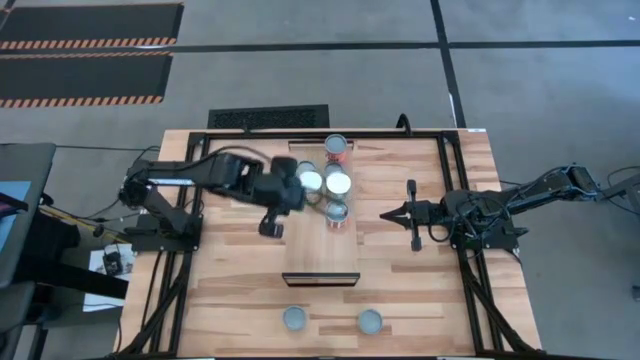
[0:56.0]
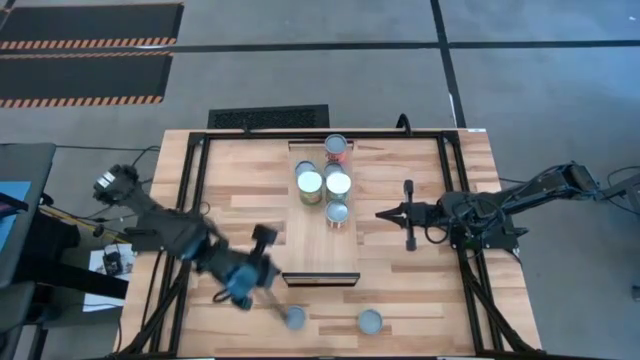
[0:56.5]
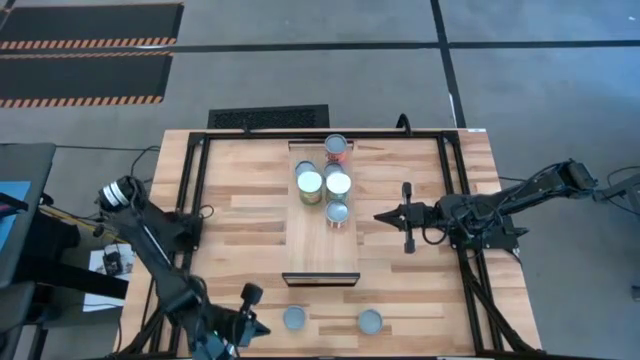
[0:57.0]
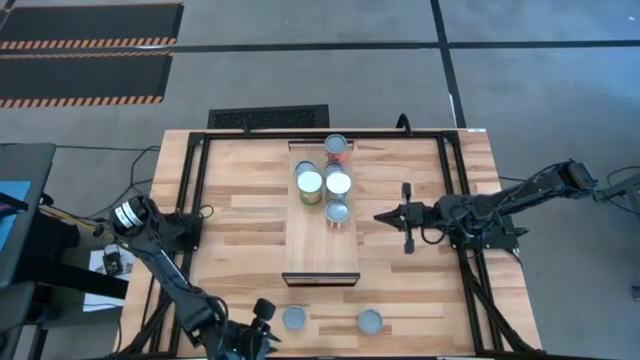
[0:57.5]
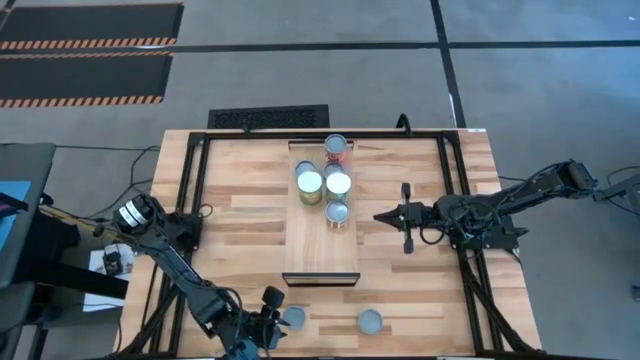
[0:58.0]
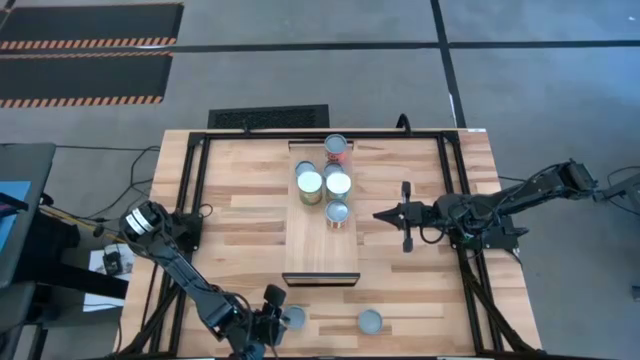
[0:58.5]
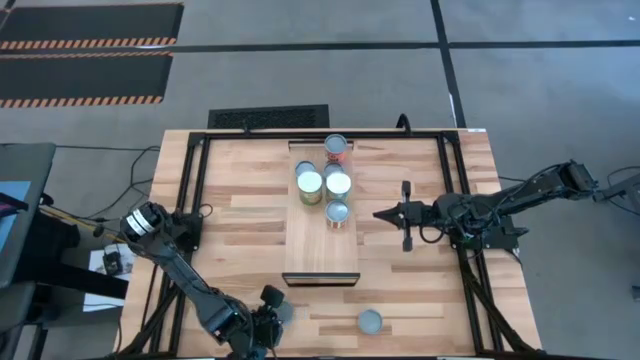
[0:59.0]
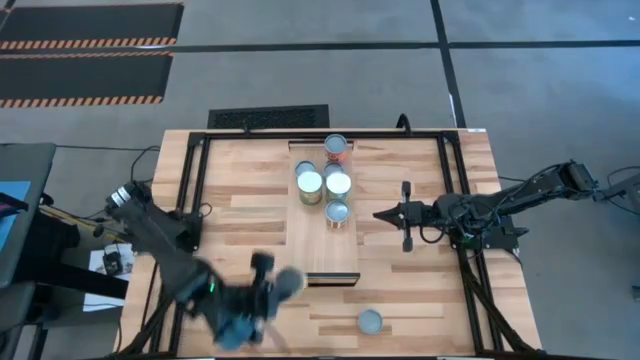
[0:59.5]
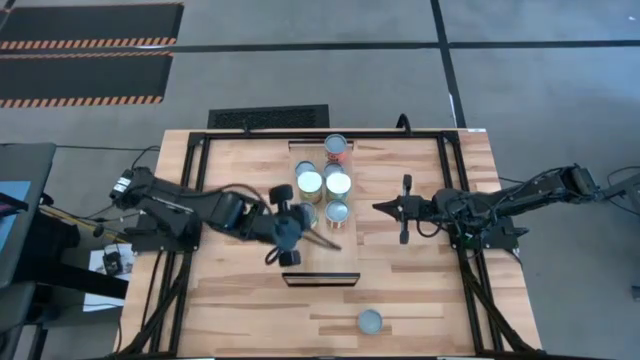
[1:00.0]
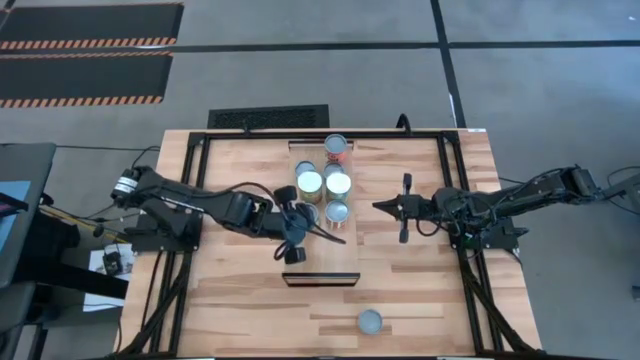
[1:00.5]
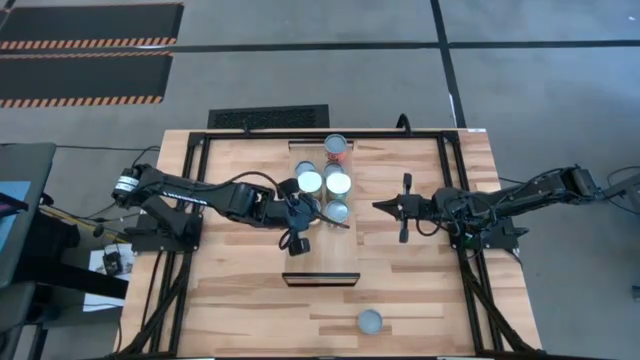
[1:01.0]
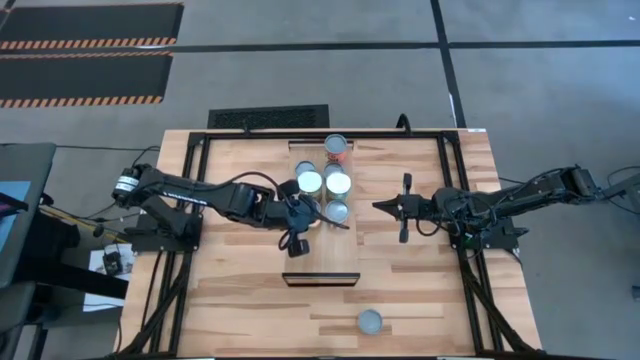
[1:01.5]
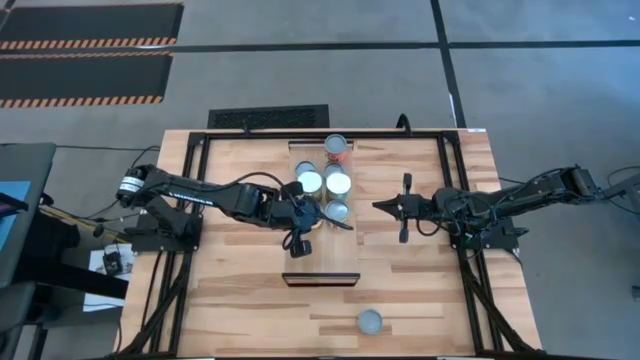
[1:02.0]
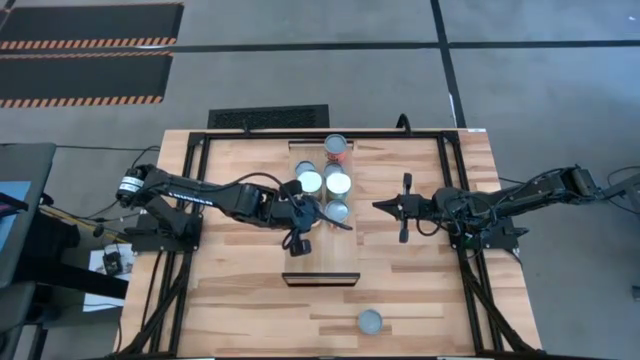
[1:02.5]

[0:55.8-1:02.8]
Task: Pick and place cans onto a shelf
Put the small green can on the shelf aligned with the other small red can

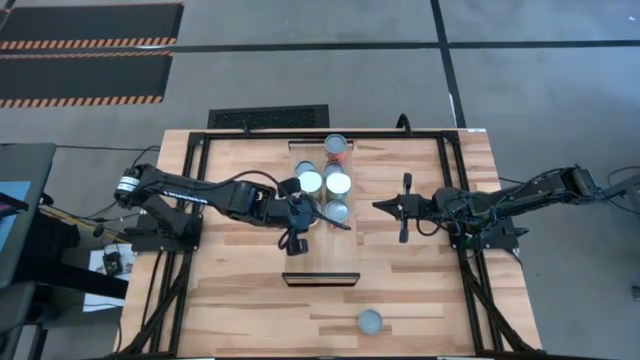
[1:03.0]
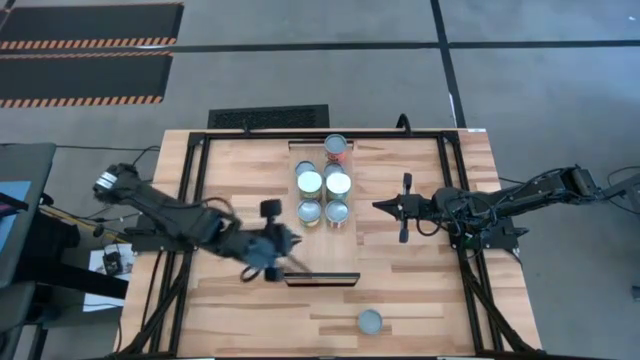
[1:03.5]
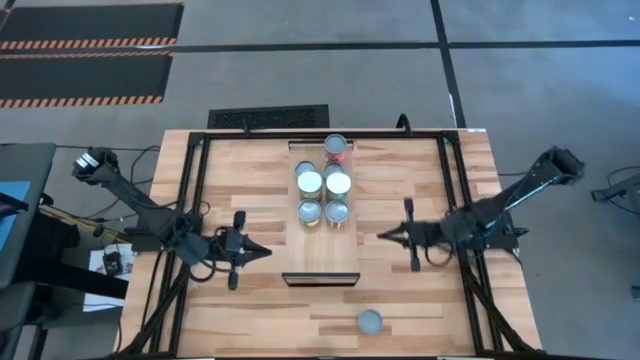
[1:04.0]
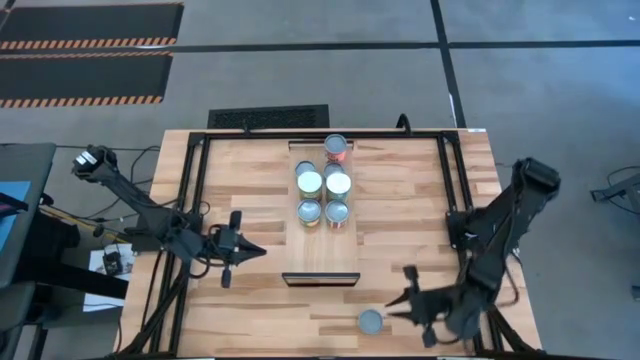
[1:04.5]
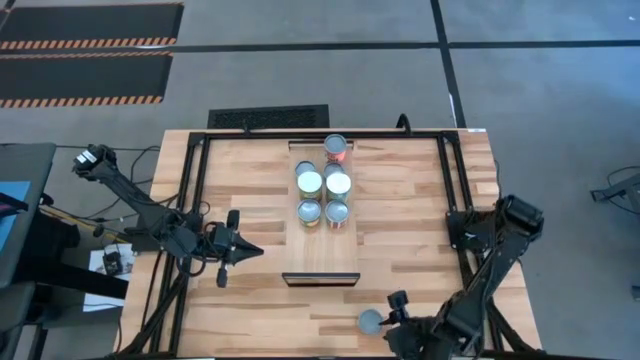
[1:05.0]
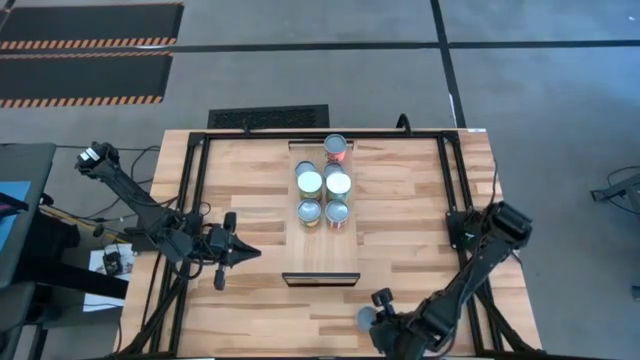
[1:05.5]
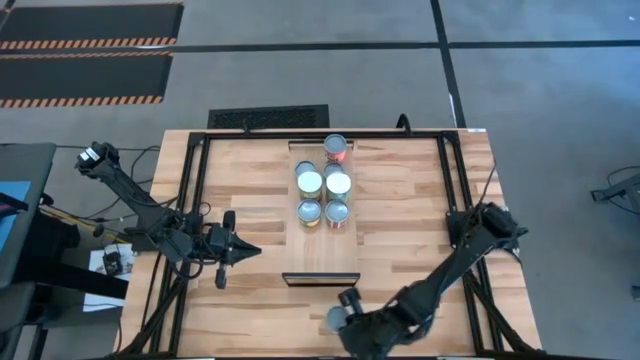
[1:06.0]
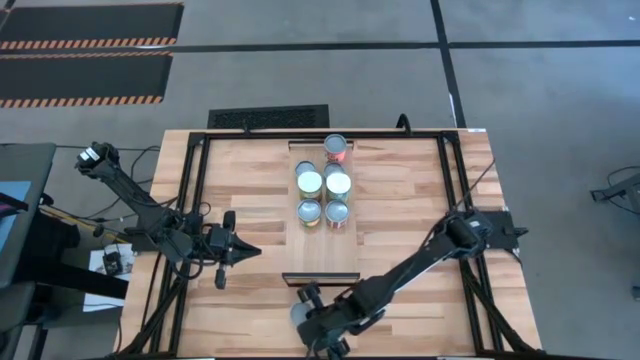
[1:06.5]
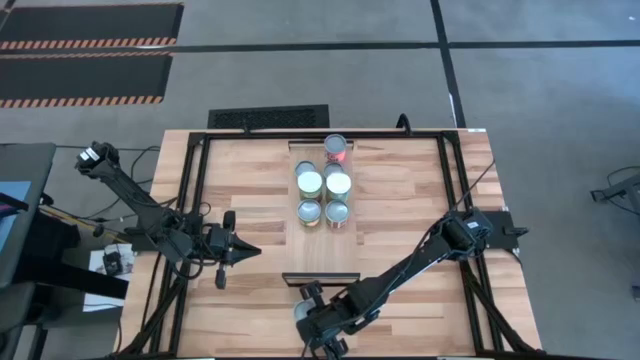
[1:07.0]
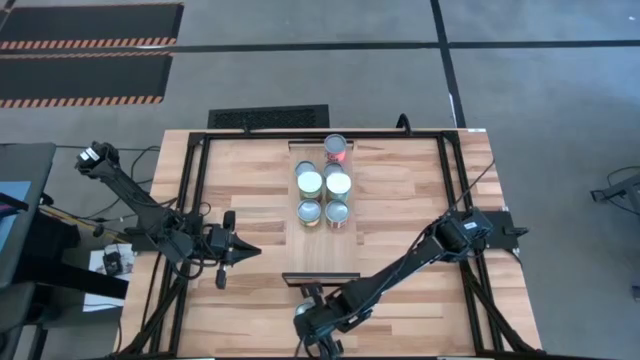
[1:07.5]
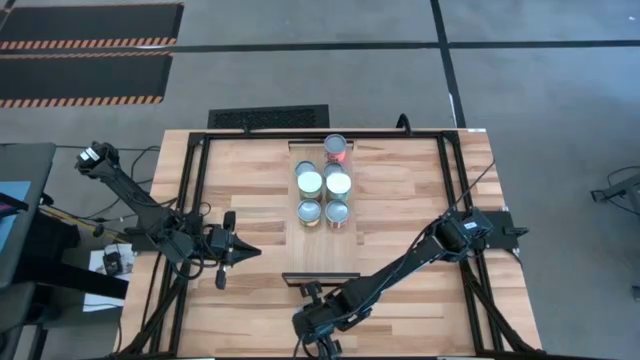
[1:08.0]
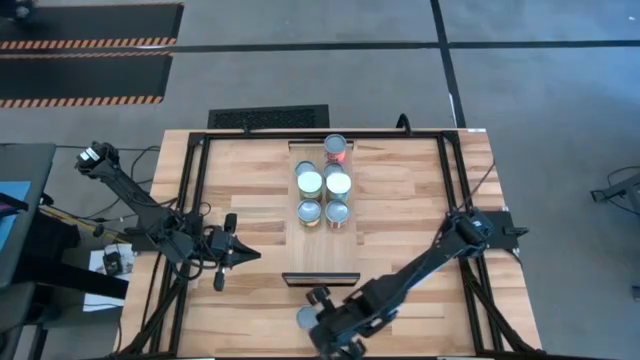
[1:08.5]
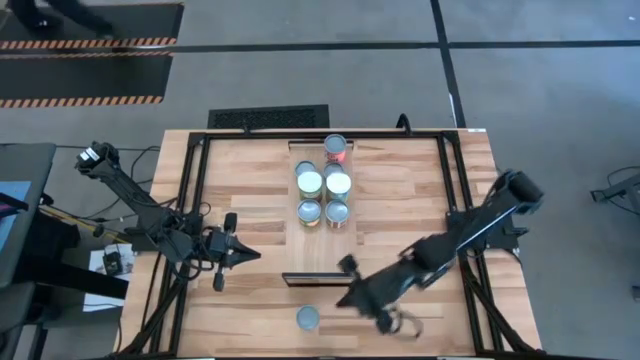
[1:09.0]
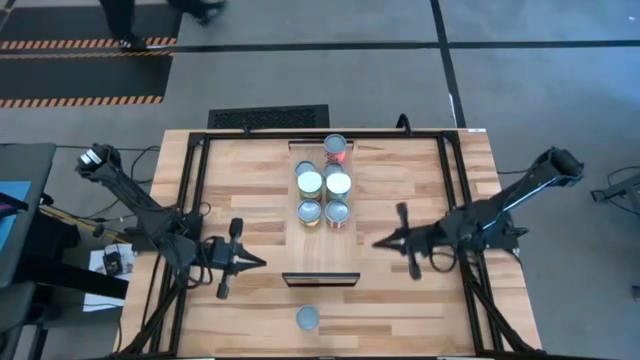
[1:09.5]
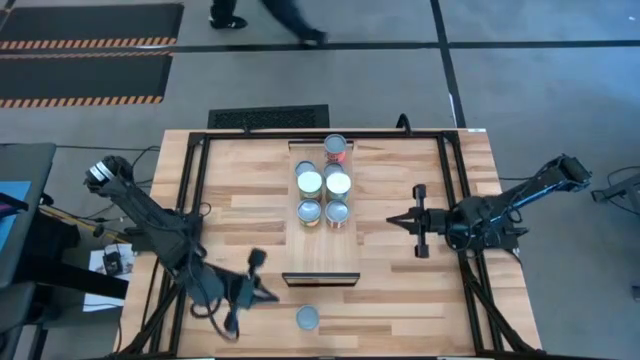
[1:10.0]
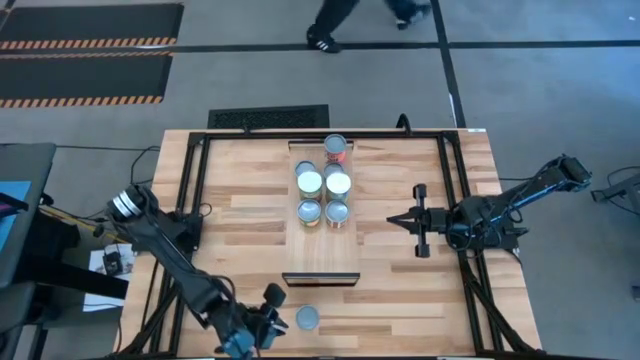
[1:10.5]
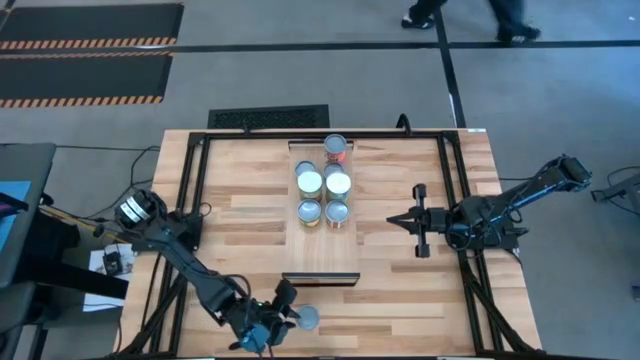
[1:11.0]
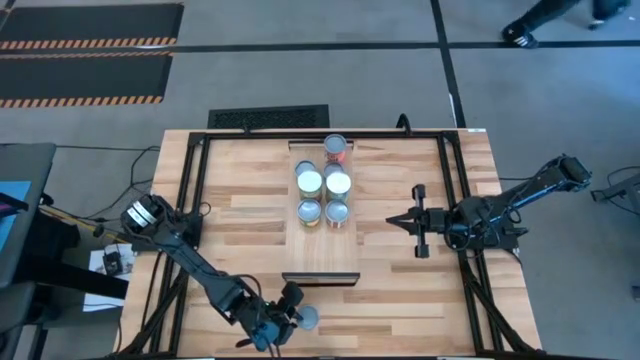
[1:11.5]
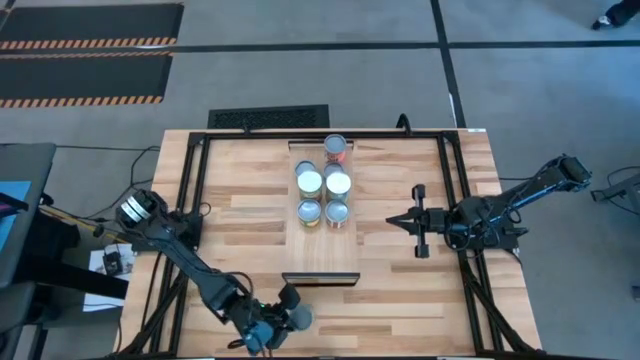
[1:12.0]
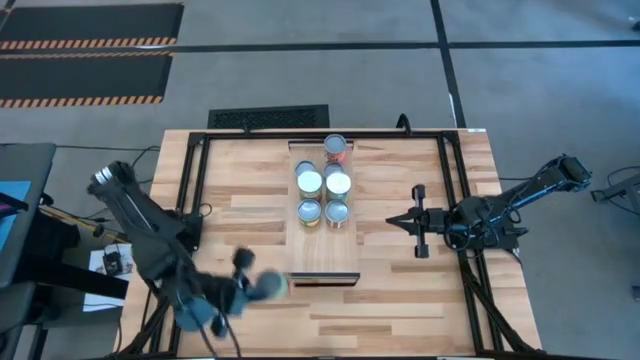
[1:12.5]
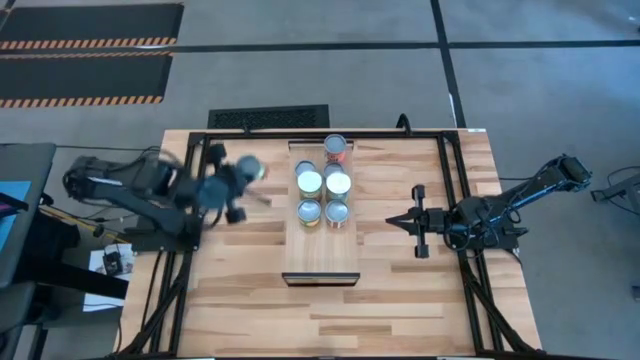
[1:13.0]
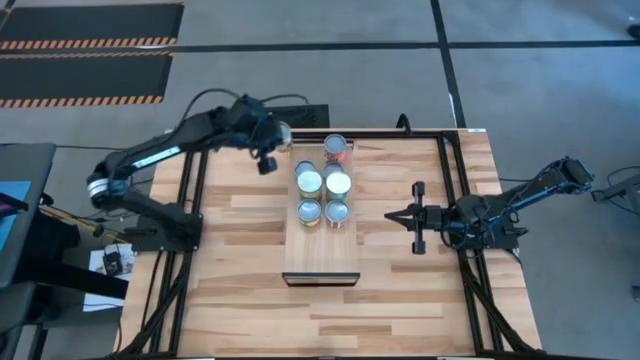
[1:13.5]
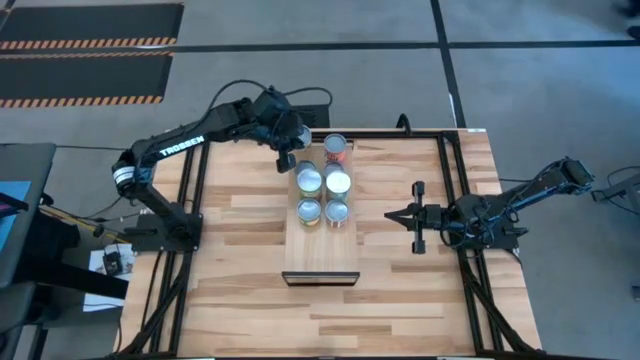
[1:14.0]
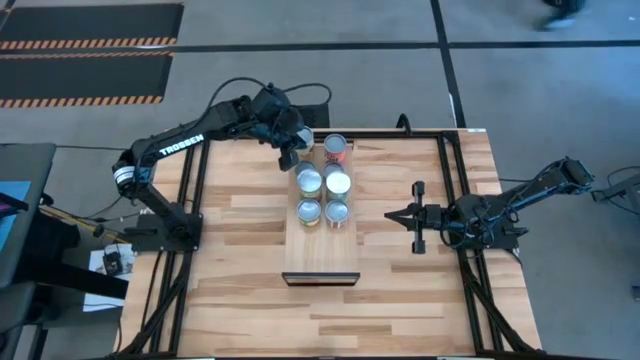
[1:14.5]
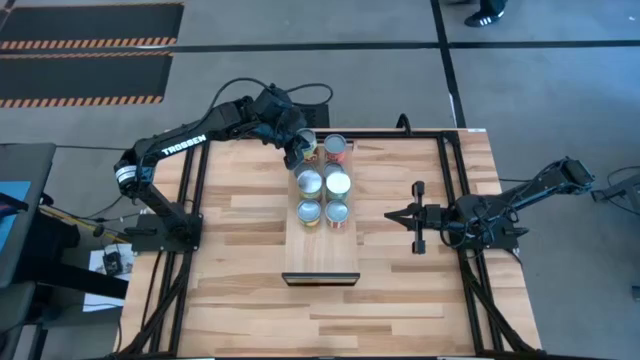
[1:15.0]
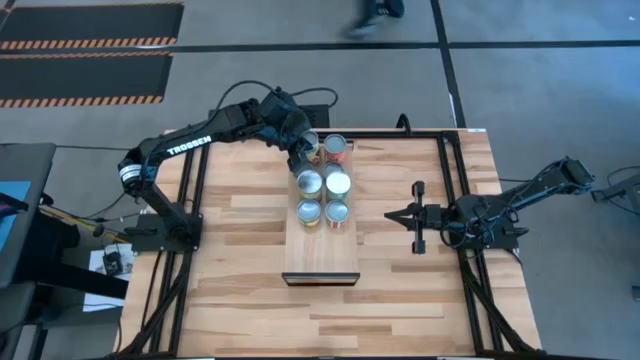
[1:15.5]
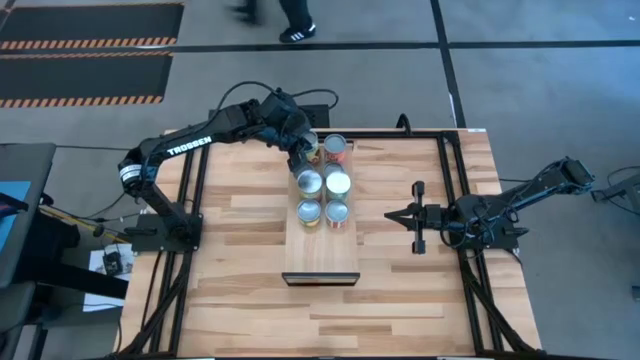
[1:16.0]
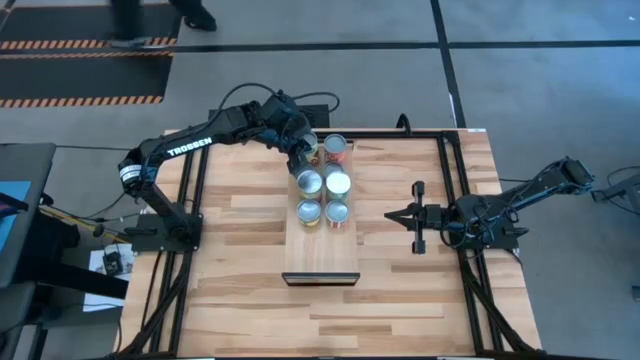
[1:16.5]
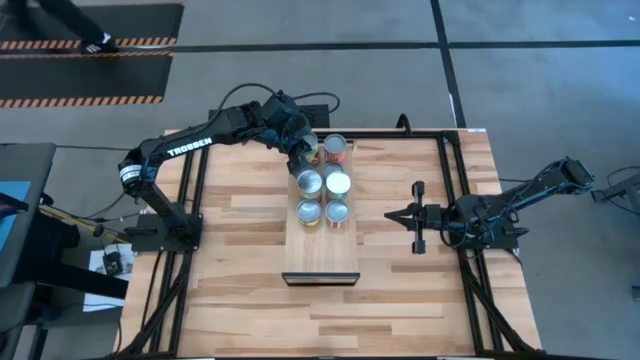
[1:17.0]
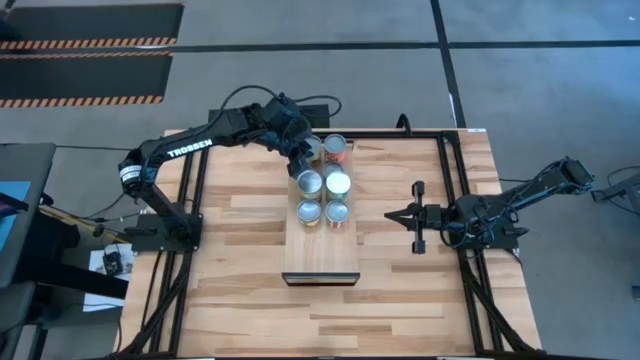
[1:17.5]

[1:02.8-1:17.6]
Put the big green can on the shelf aligned with the other big white can

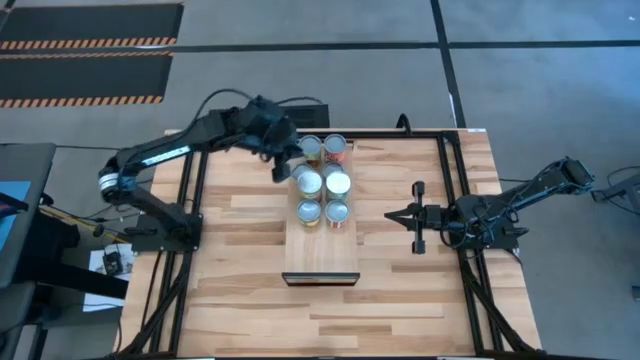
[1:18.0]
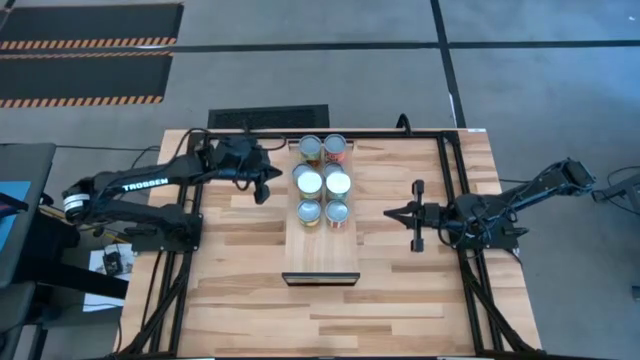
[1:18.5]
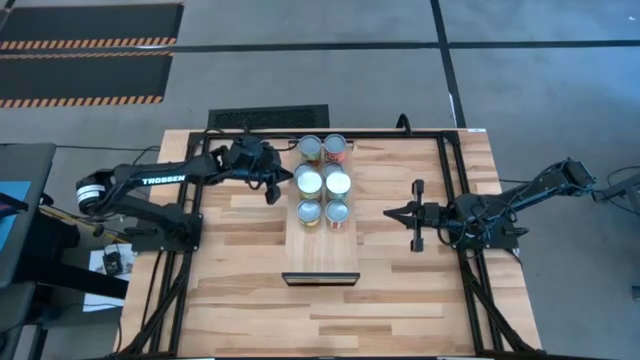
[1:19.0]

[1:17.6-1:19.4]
Adjust the small yellow can on the shelf
